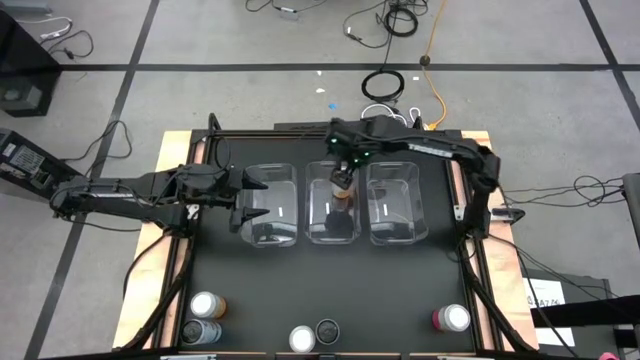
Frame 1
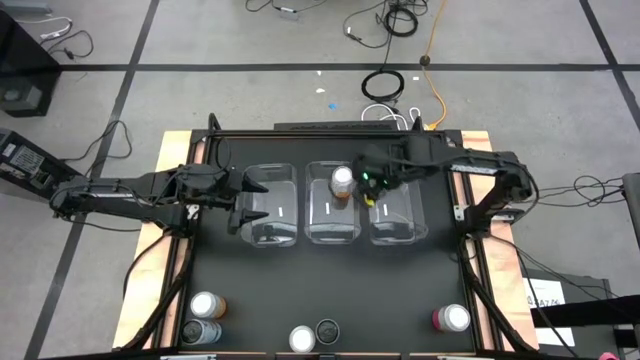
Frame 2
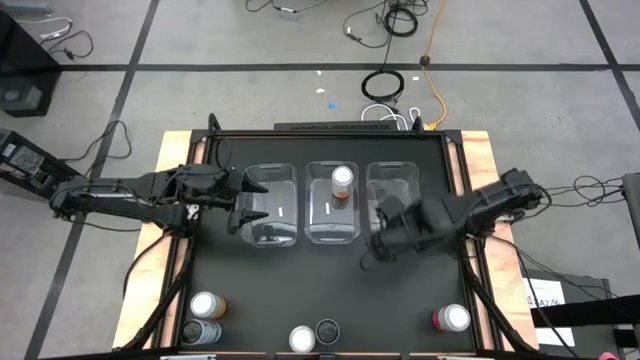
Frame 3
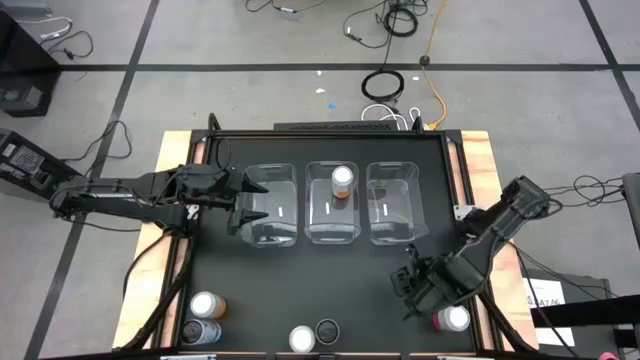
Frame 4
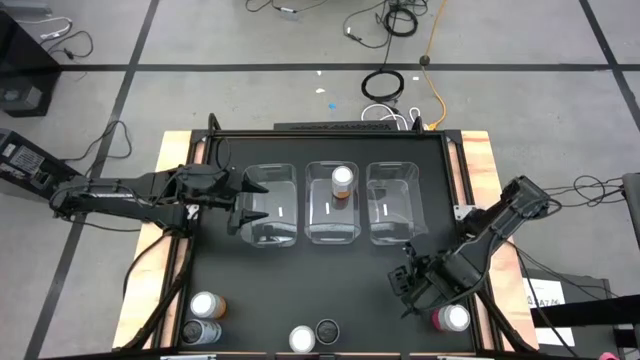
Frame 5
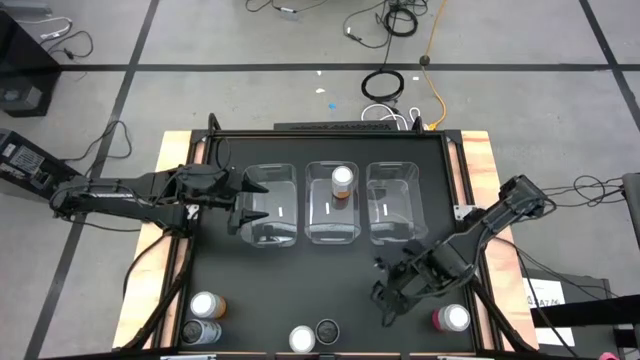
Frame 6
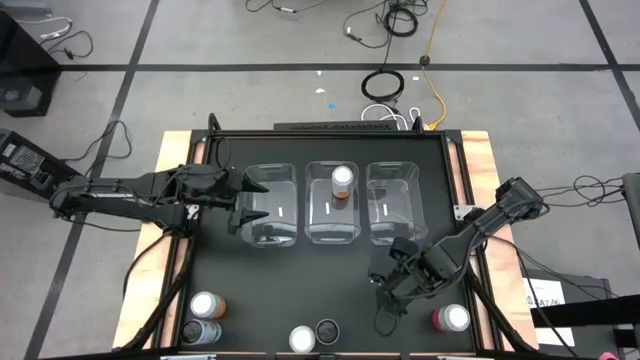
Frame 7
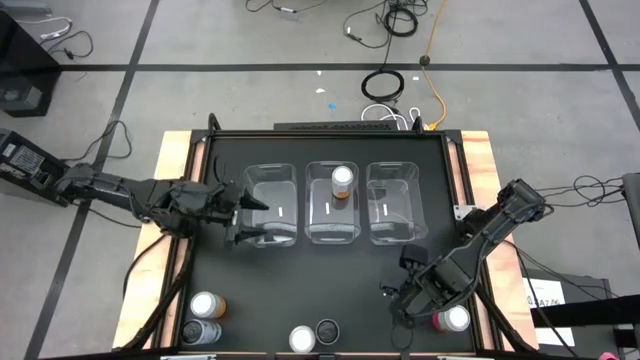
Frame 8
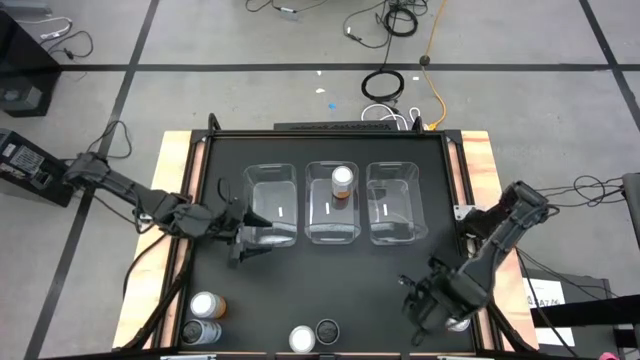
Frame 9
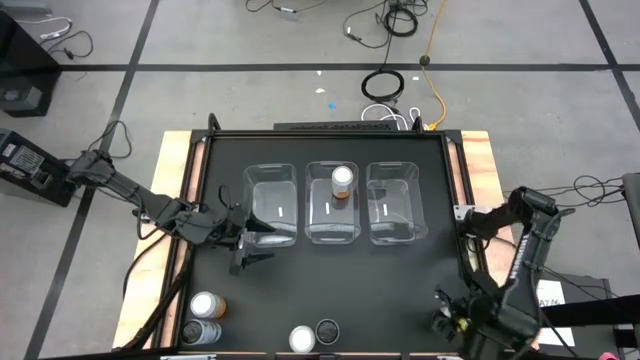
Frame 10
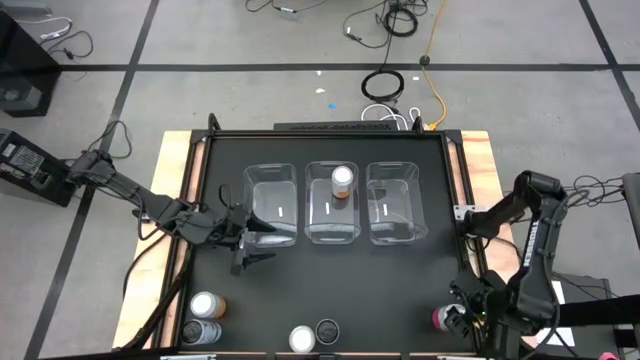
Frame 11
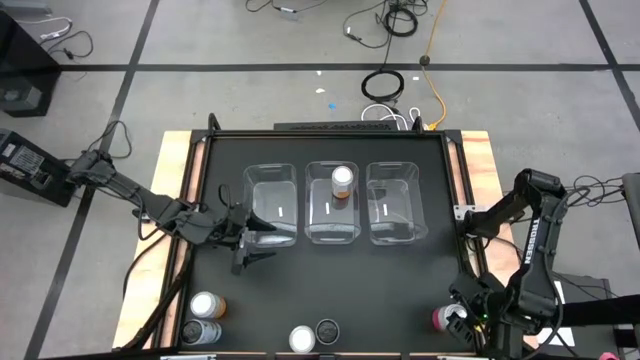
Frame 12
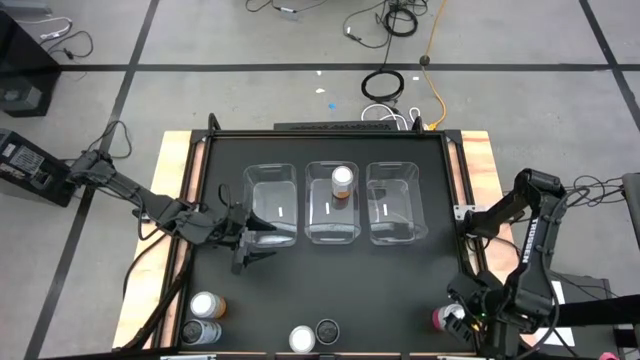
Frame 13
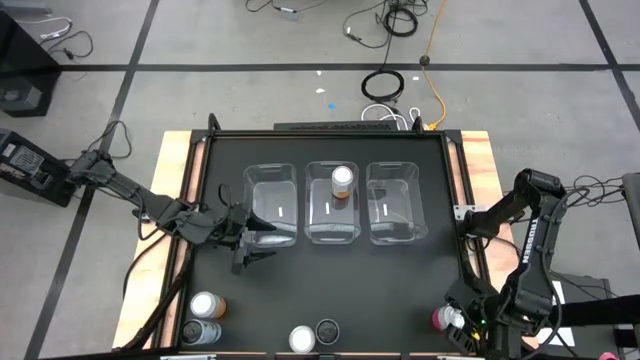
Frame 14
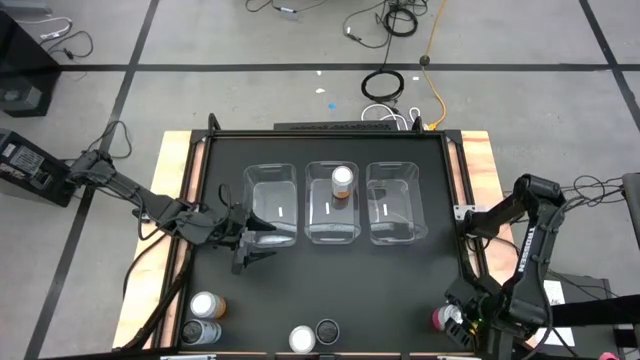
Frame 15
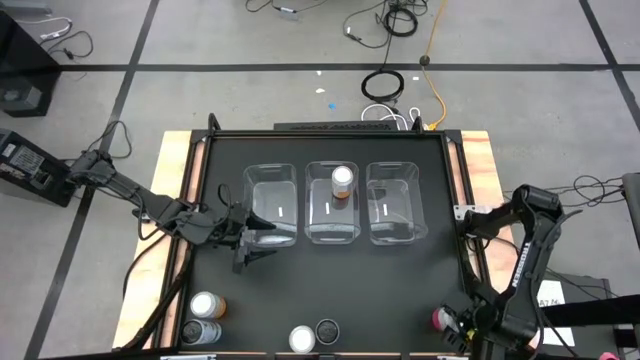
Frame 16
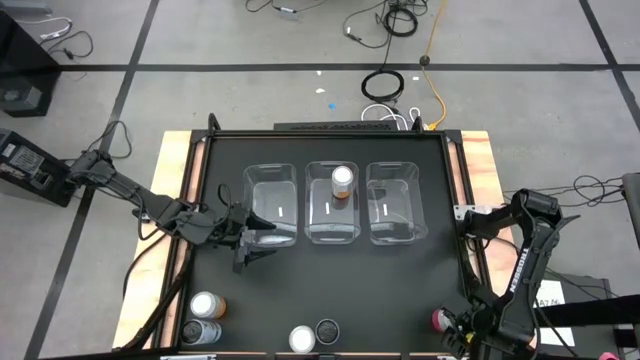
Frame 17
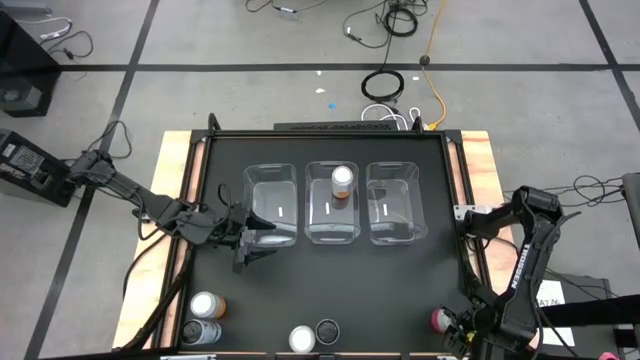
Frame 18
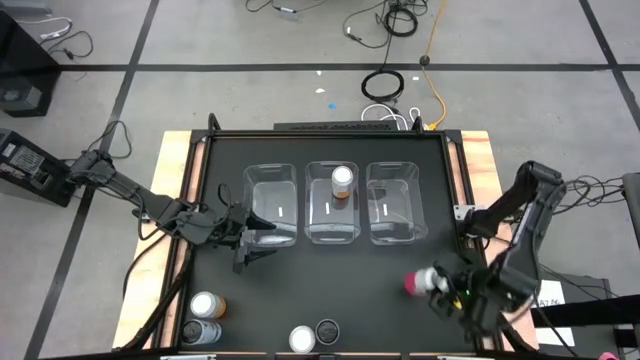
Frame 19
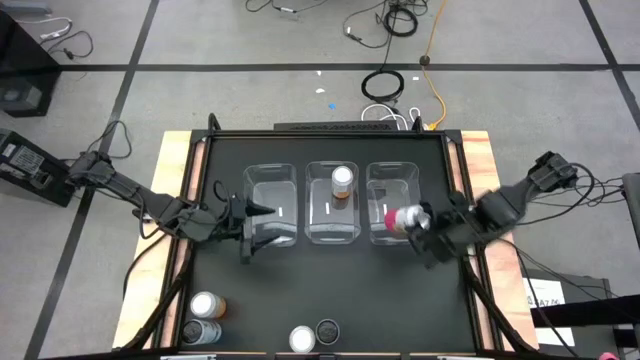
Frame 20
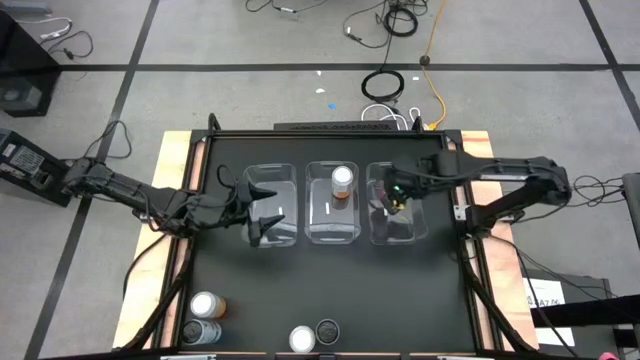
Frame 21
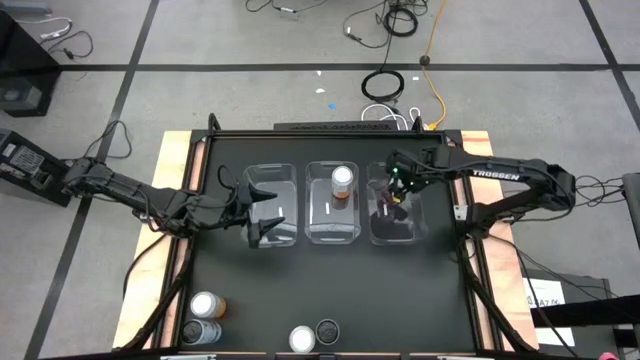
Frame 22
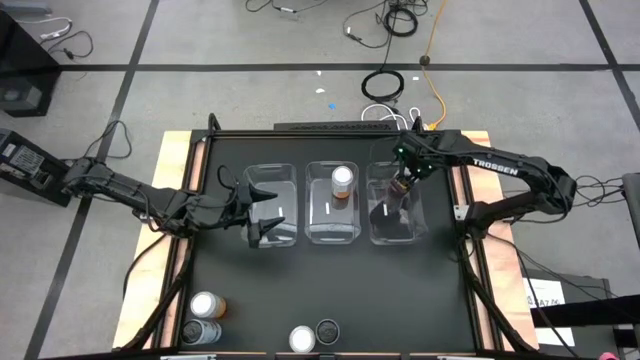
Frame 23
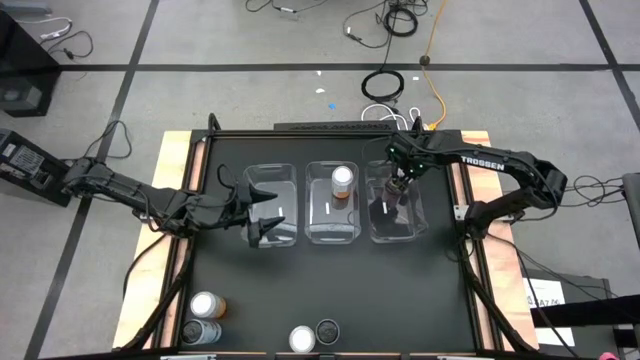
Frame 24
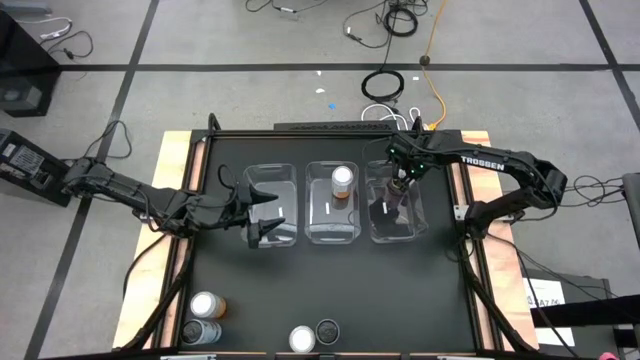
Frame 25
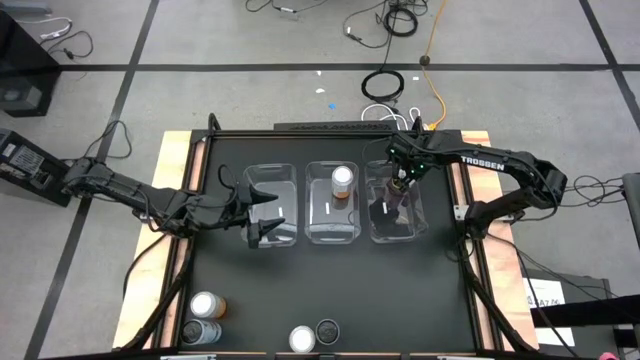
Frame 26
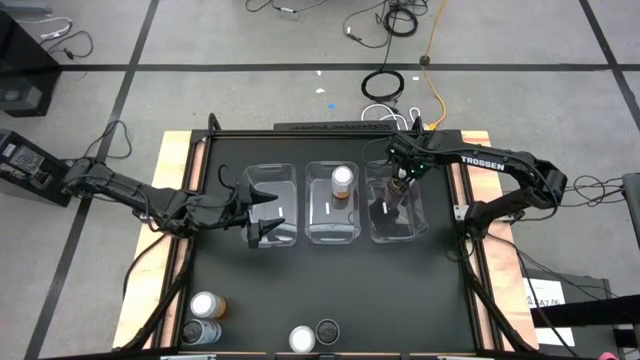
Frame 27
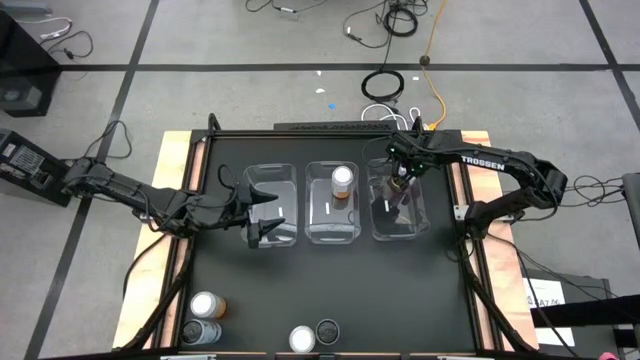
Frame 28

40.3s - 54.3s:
Task: Sort soda cans
Put the right pink soda can into the right transparent bin

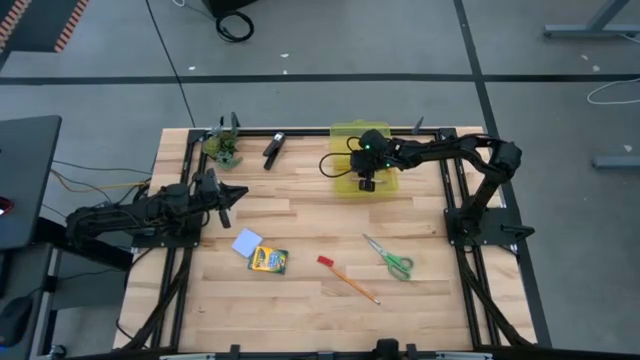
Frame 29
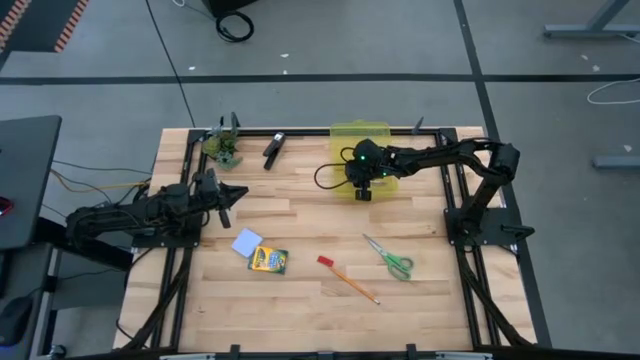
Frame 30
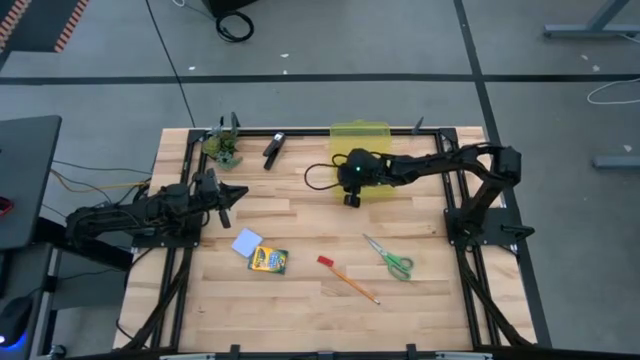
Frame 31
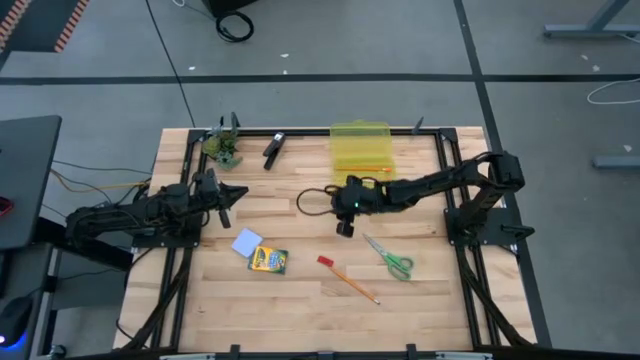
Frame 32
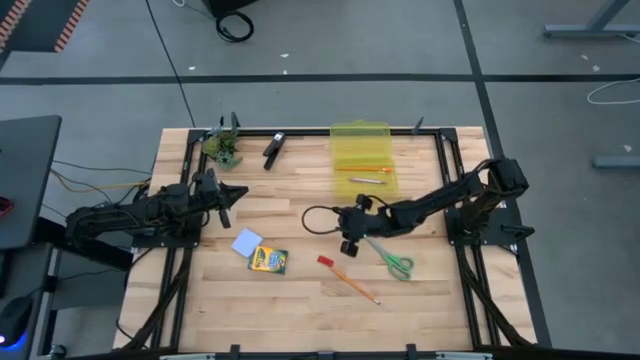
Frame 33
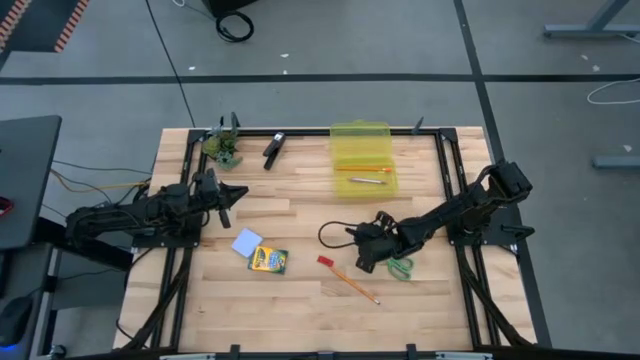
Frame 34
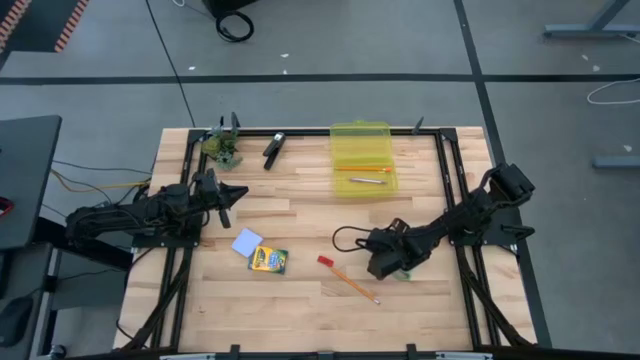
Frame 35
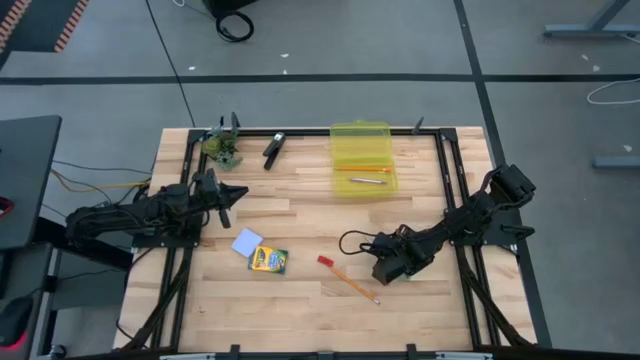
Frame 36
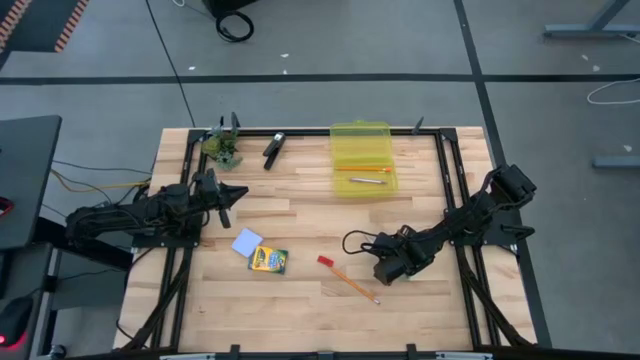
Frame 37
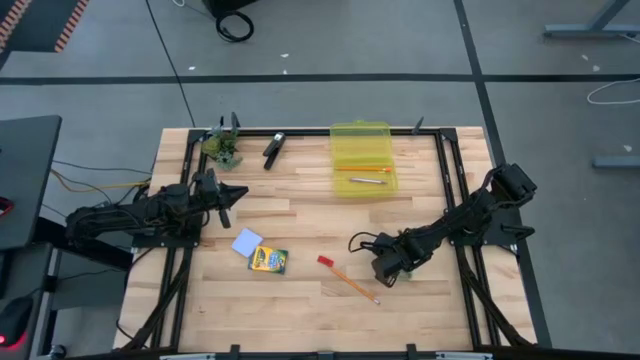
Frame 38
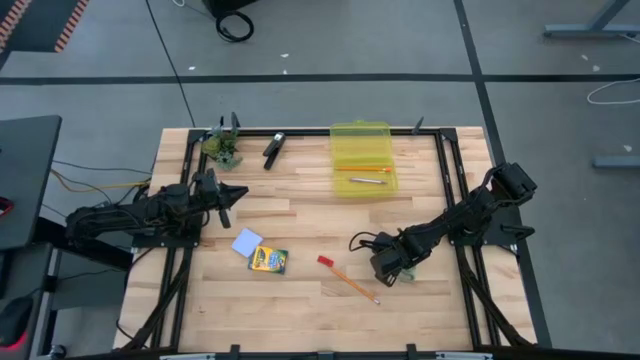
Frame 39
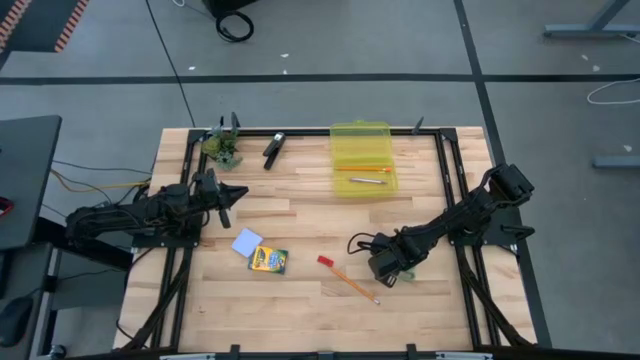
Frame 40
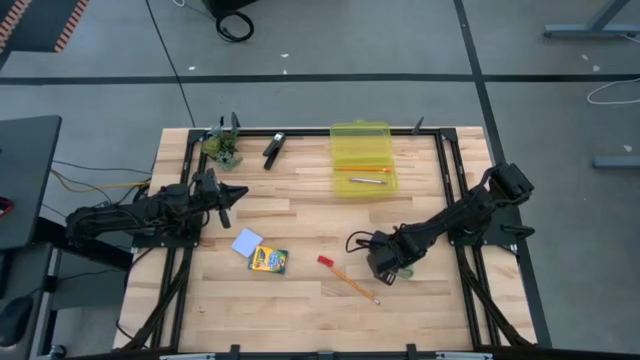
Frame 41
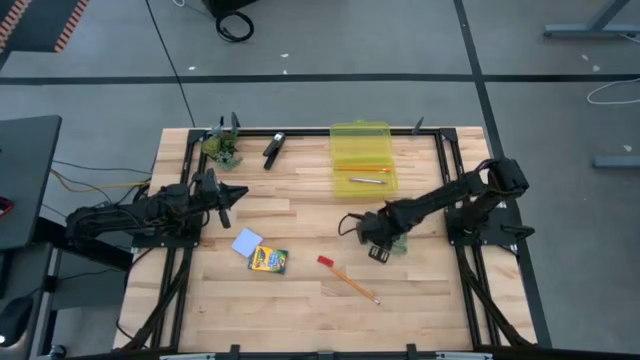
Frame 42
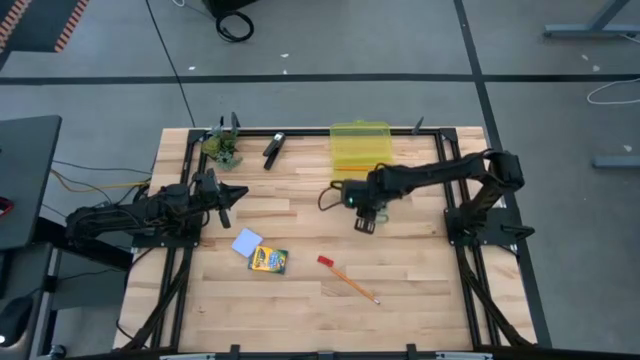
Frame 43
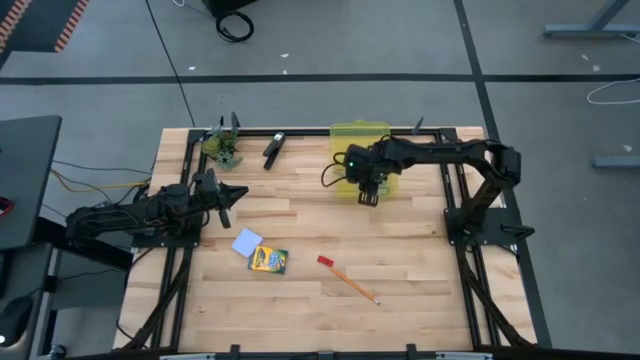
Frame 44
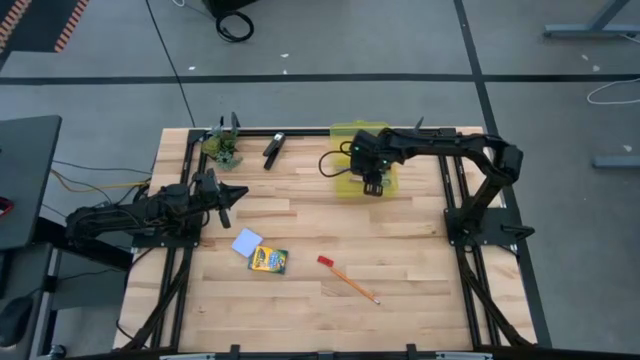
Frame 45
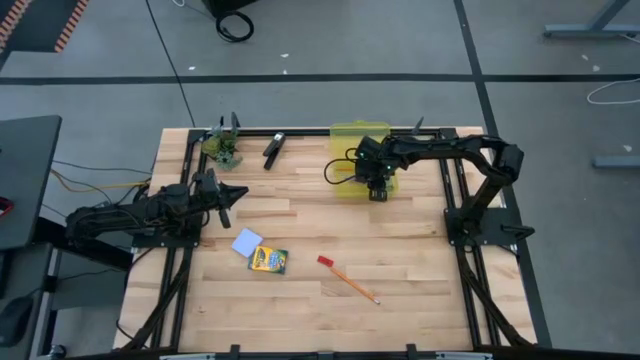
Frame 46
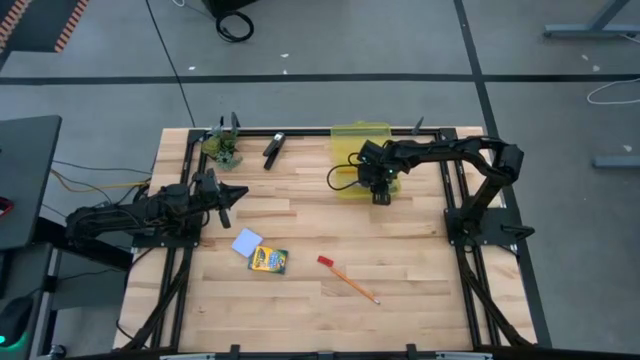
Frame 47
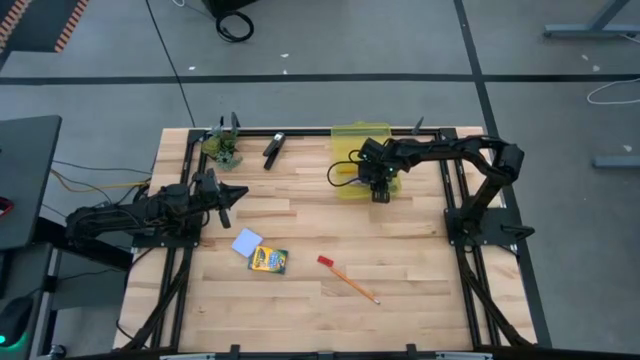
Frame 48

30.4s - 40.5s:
Task: Pack school essentials
Put the green scissors into the yellow supply box
